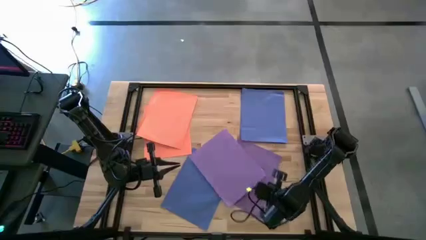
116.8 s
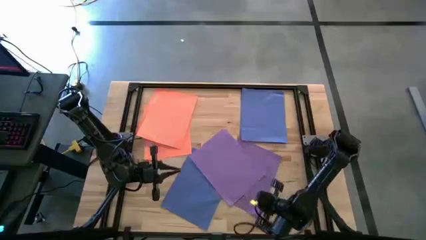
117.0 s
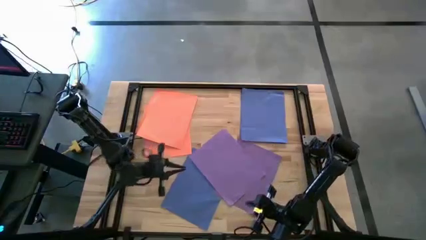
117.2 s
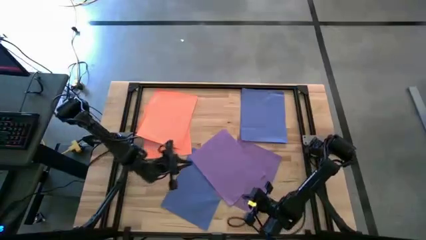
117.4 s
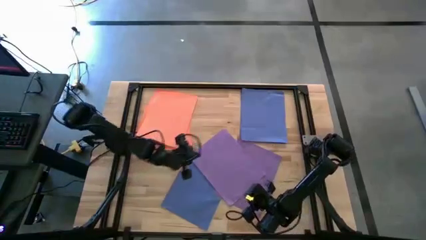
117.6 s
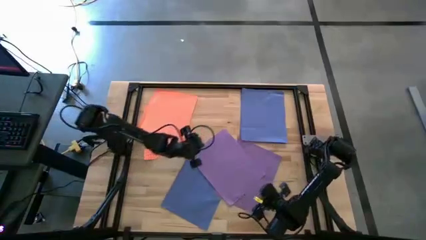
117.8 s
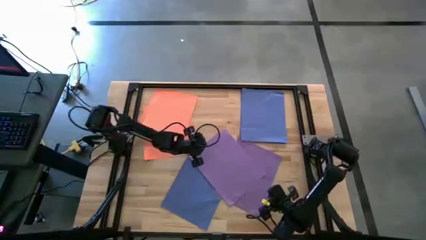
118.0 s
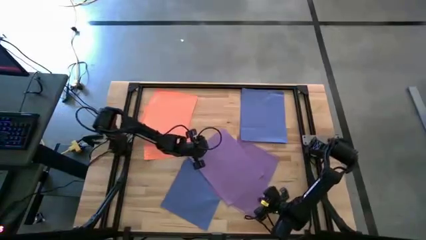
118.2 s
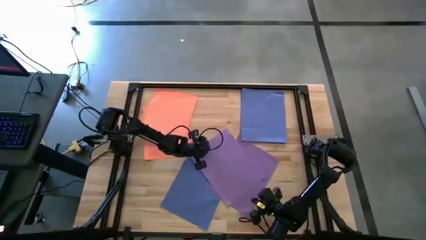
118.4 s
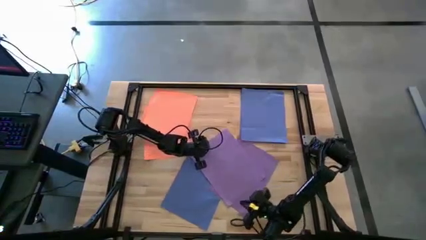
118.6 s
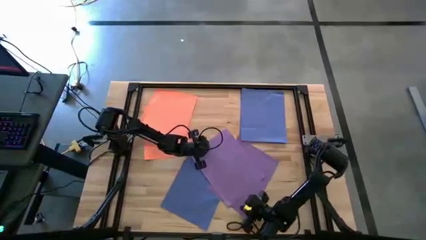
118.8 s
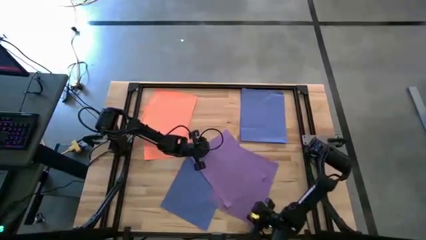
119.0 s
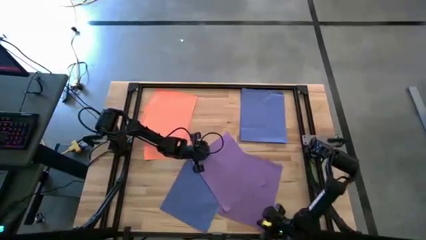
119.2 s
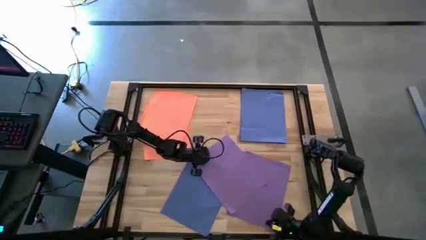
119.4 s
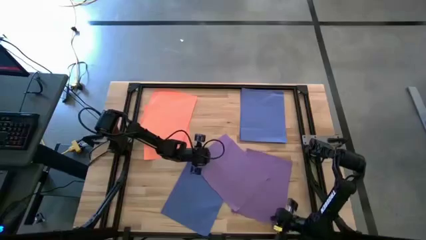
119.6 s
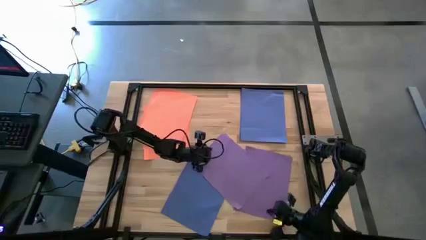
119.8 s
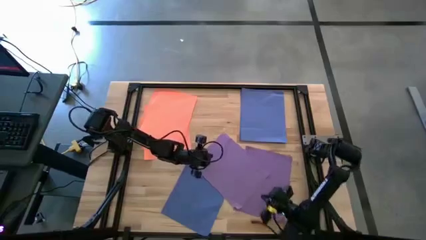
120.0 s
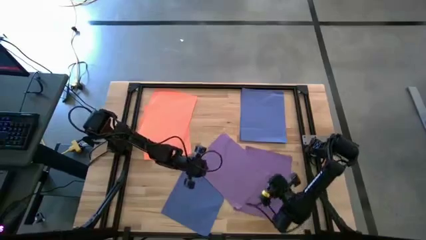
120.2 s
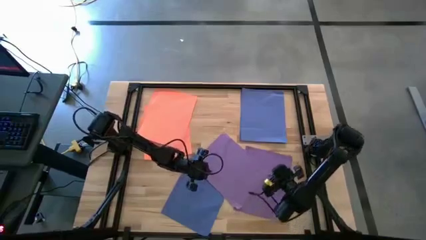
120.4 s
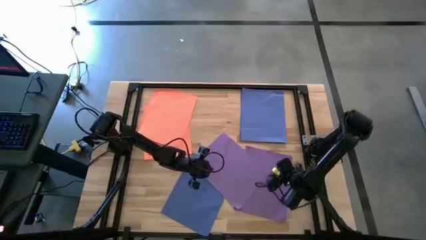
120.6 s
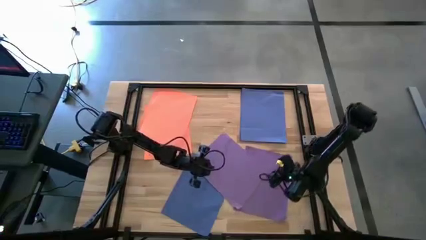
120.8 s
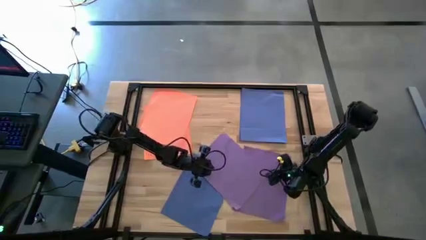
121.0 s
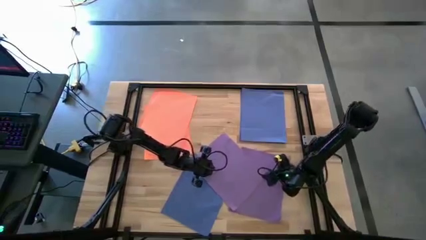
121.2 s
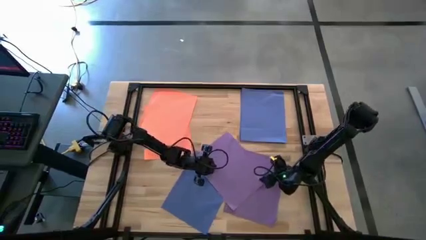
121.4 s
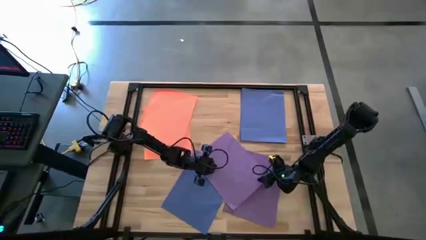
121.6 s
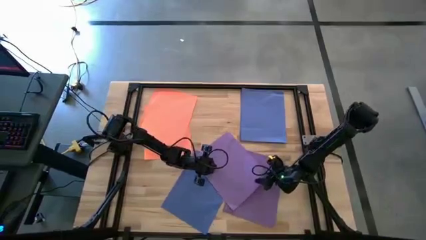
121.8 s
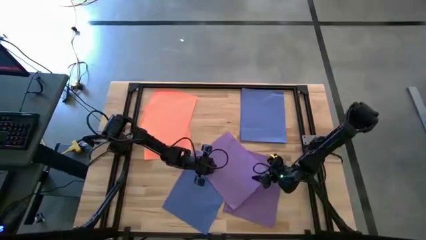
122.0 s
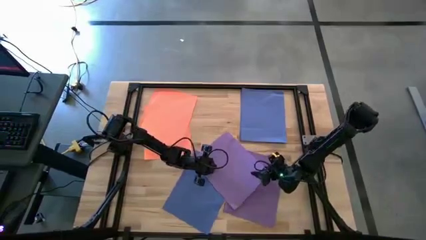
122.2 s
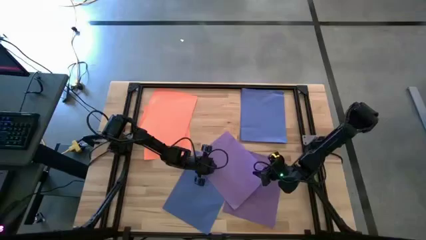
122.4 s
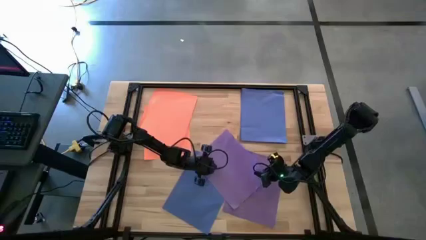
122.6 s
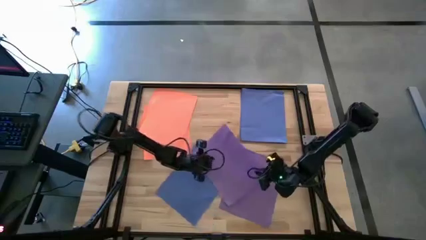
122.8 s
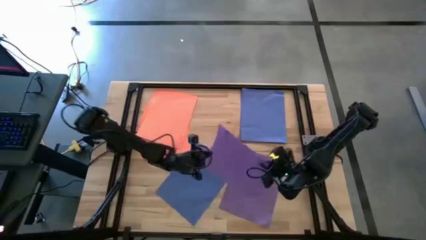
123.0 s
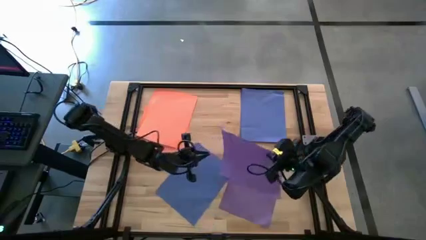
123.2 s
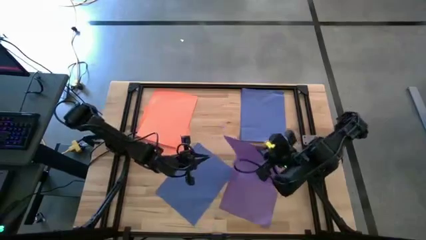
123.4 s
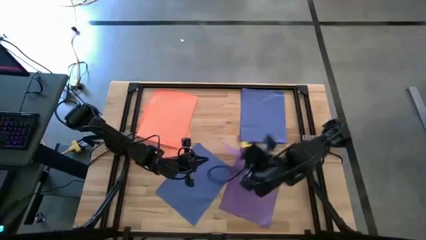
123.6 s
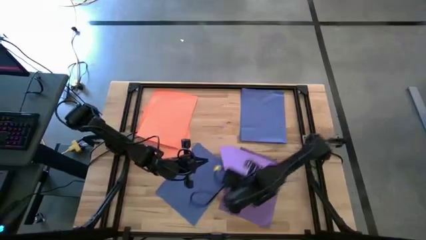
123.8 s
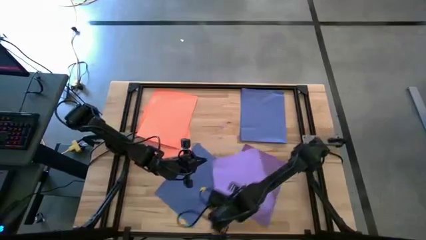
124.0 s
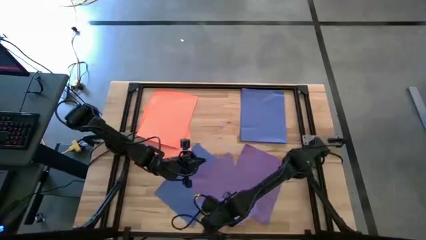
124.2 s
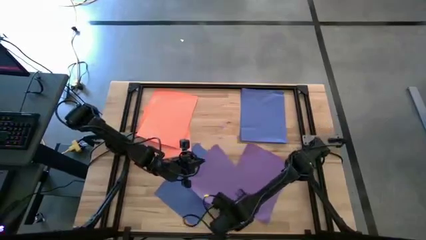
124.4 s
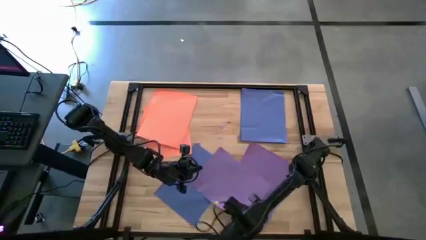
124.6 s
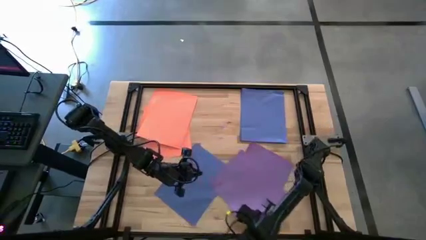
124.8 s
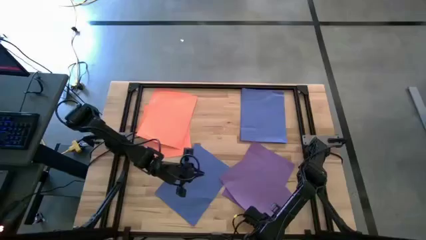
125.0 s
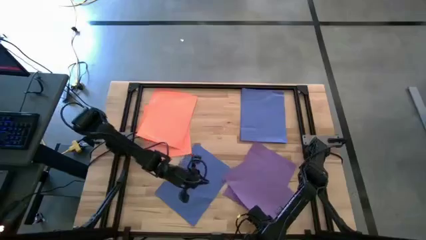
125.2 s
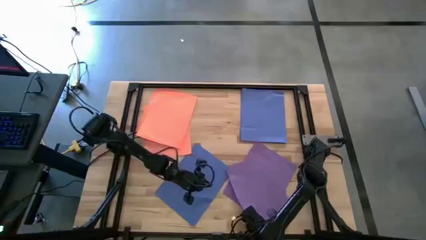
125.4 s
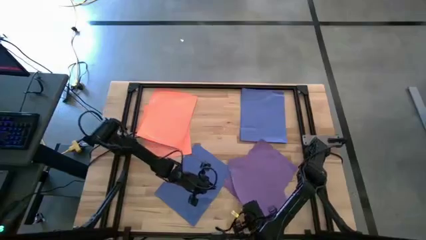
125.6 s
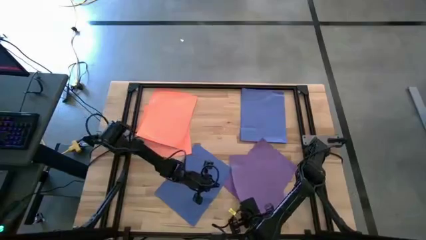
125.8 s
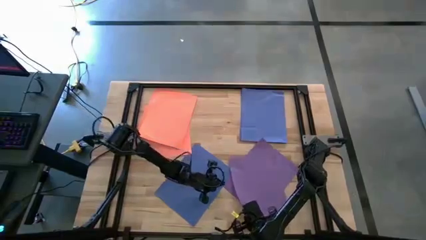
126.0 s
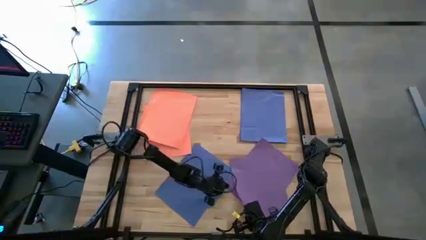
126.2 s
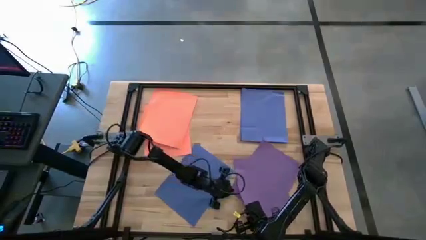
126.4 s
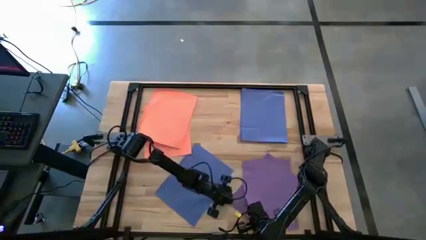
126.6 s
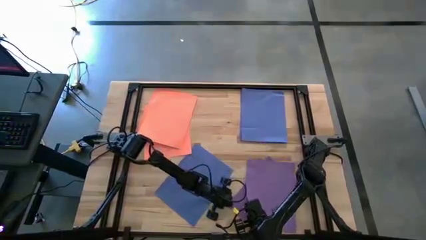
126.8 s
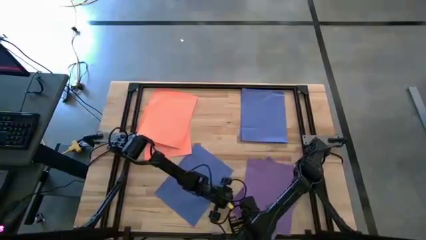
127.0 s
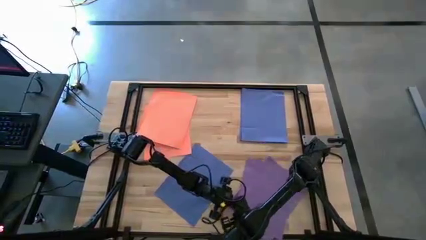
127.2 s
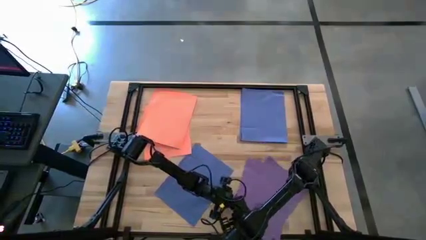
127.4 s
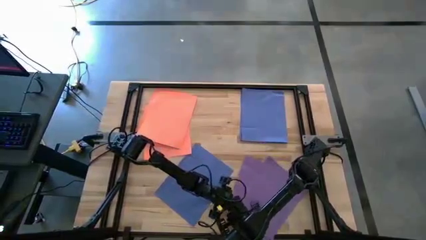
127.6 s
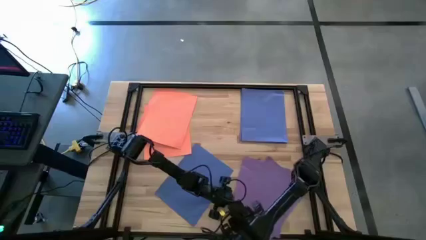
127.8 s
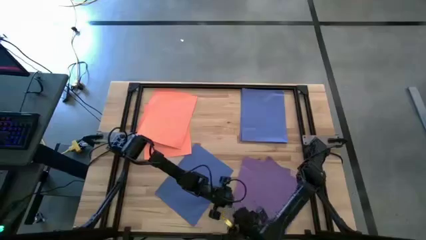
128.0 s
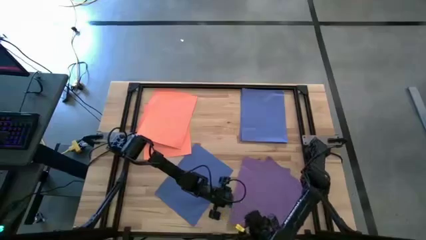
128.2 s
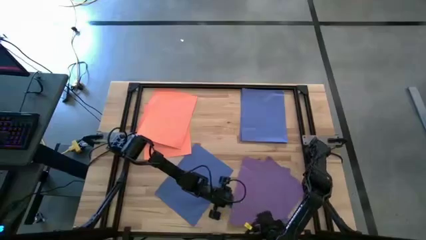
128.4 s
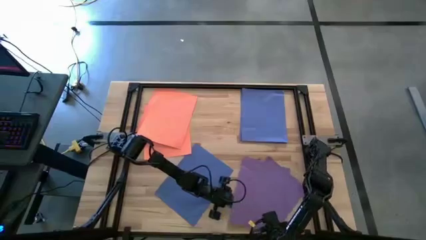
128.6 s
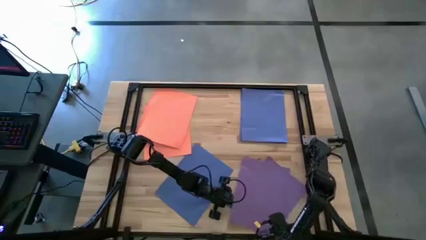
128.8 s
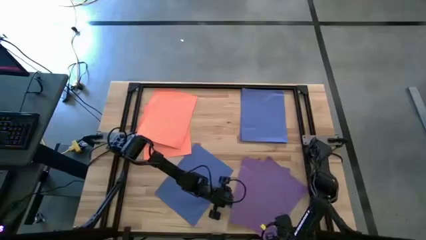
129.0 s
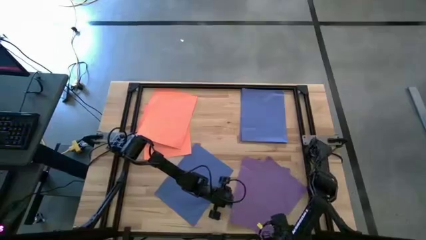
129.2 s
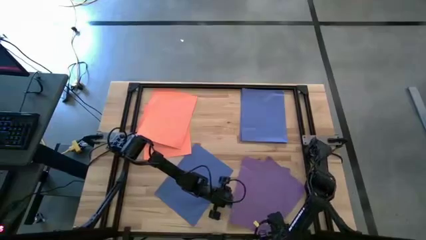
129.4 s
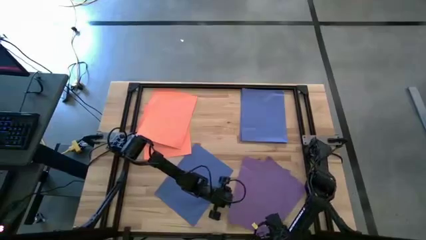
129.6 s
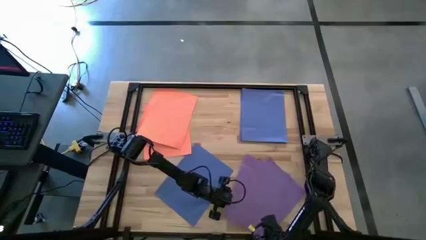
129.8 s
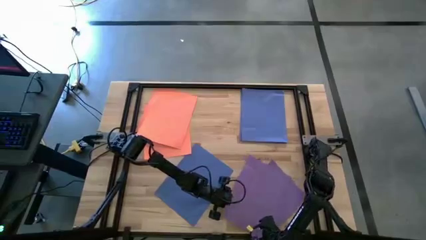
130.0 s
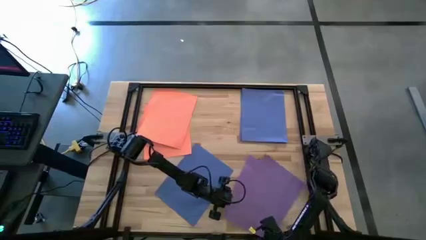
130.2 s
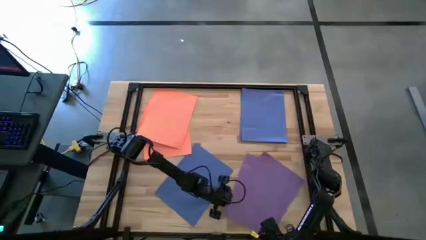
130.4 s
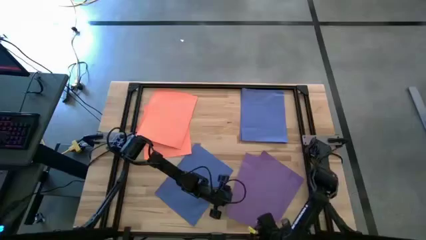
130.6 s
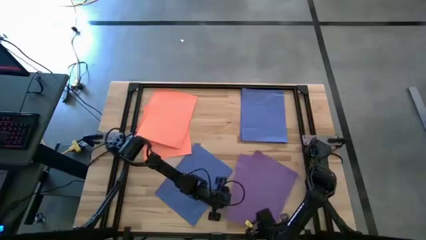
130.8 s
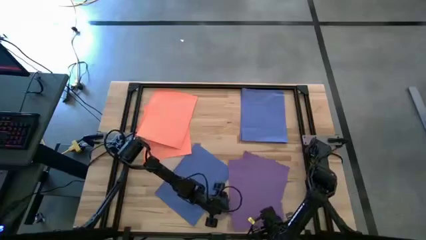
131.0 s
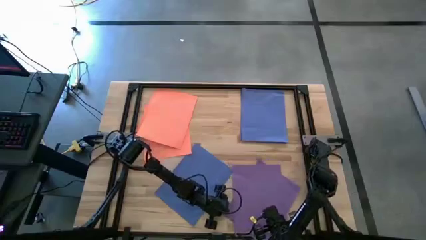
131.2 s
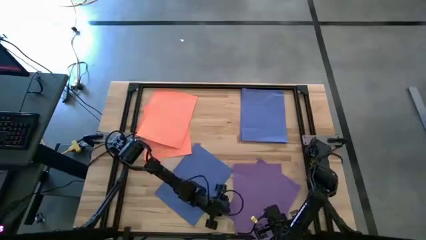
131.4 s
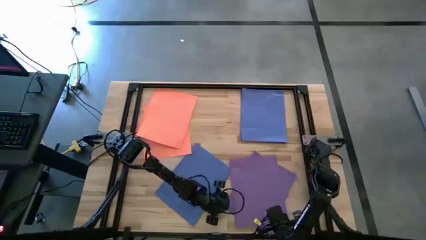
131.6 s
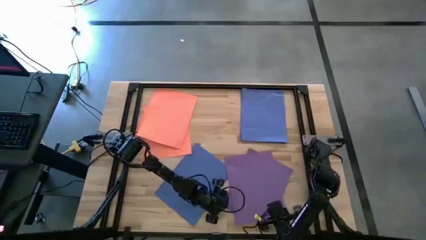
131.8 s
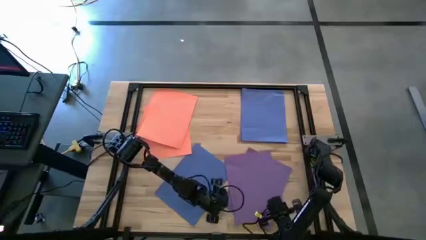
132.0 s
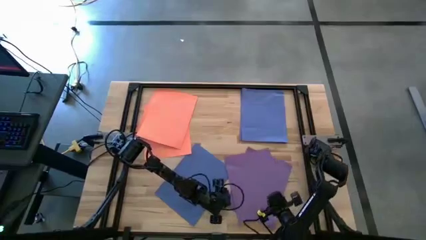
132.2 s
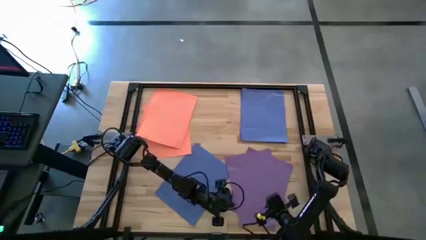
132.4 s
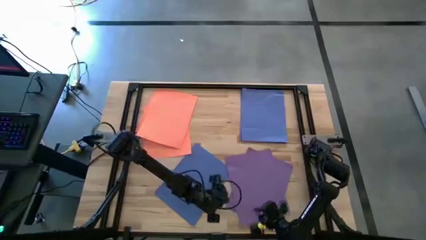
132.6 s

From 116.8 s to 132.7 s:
Task: Organize paper
Stack the purple paper on top of the purple paper

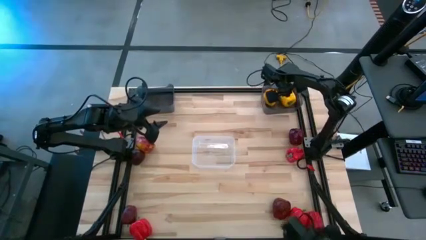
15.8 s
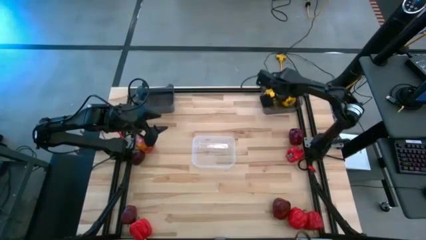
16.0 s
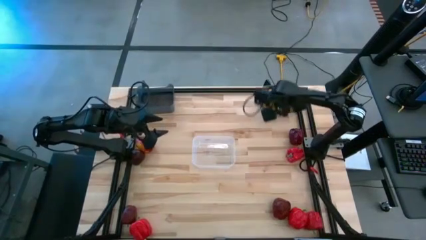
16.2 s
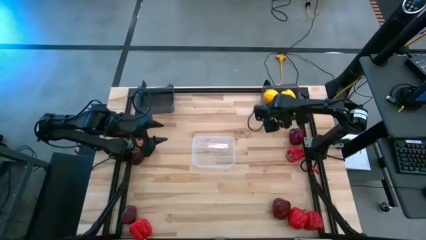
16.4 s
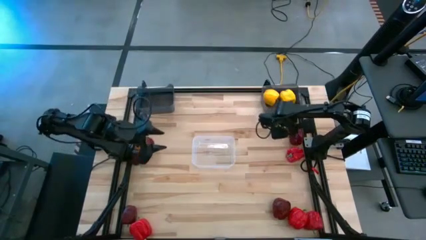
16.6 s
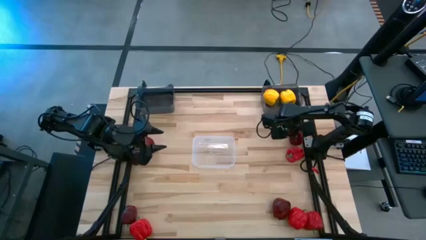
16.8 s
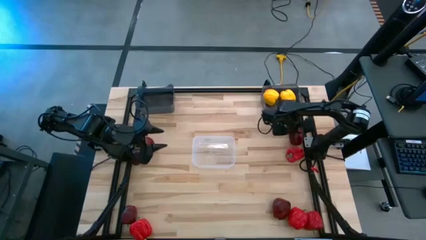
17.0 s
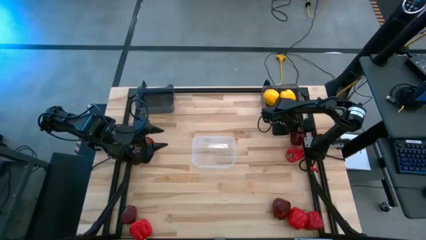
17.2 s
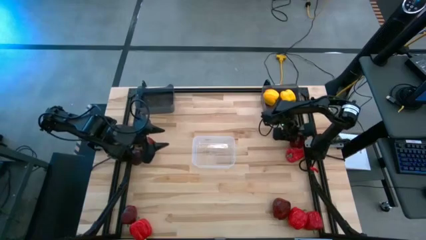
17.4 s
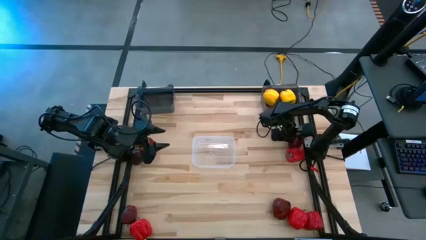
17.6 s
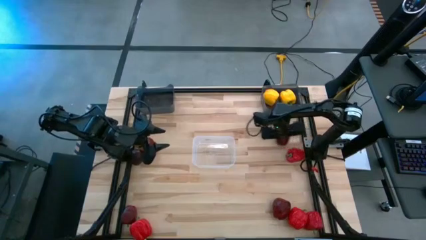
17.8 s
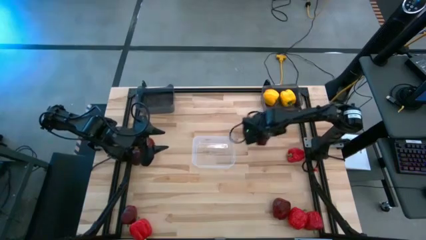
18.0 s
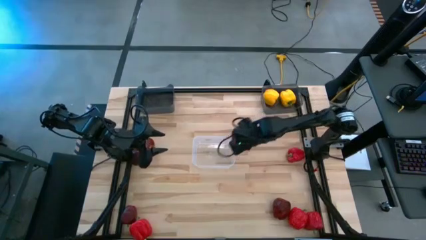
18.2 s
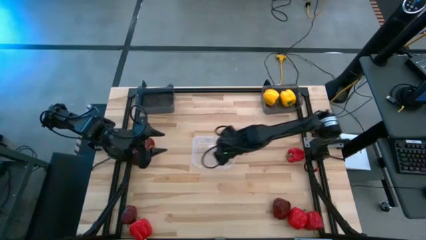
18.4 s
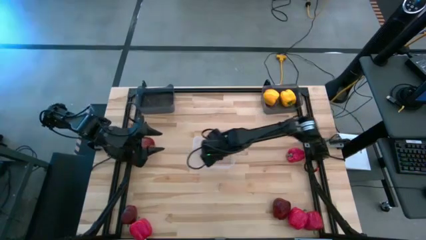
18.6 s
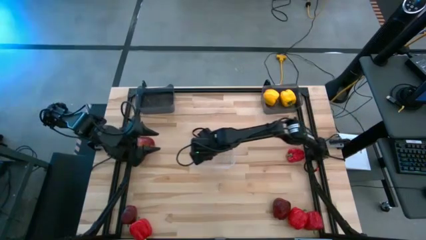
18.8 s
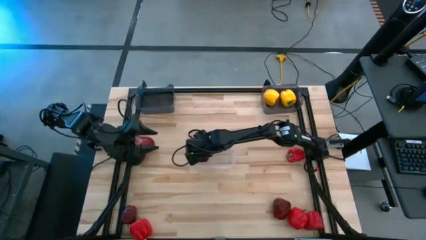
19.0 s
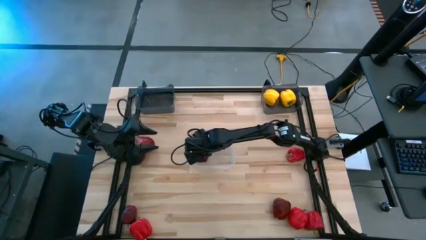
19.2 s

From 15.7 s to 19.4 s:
Task: Sort produce into baskets
Put the red apple into the transparent bin
